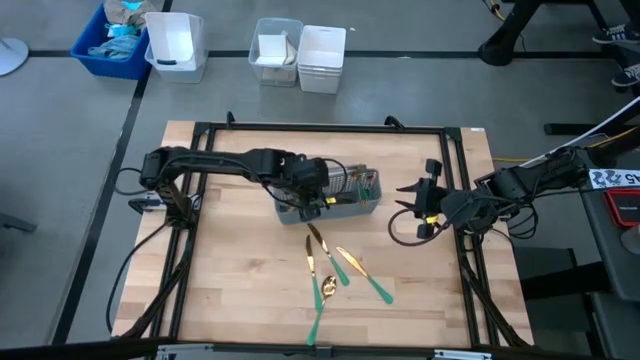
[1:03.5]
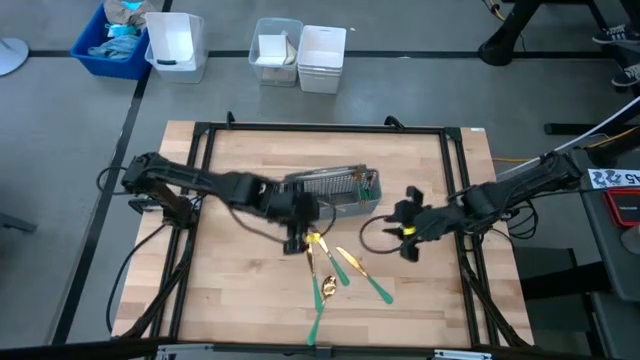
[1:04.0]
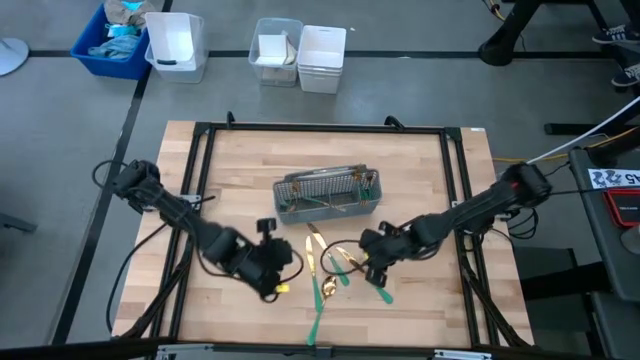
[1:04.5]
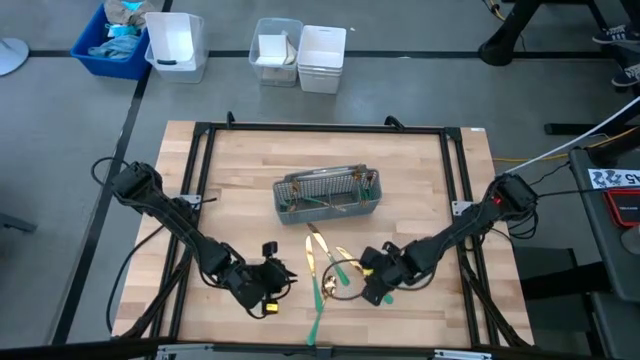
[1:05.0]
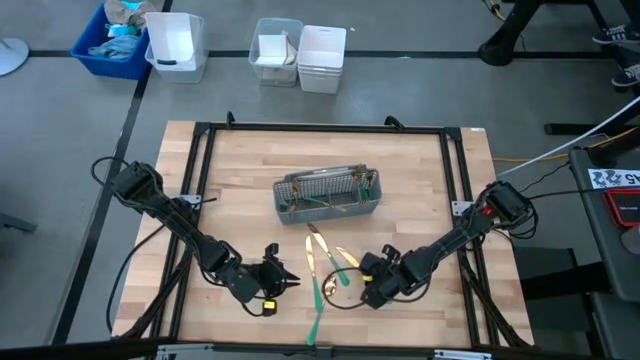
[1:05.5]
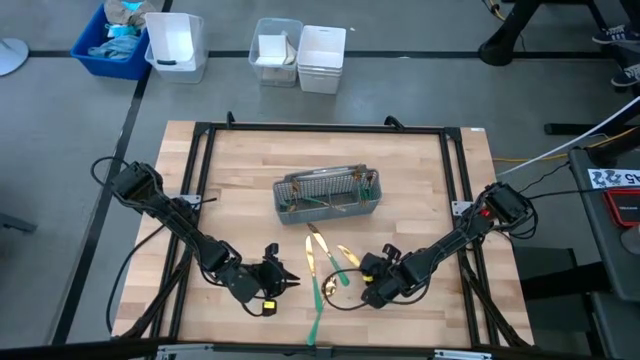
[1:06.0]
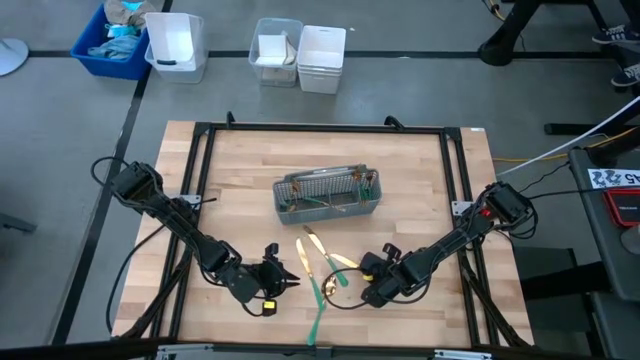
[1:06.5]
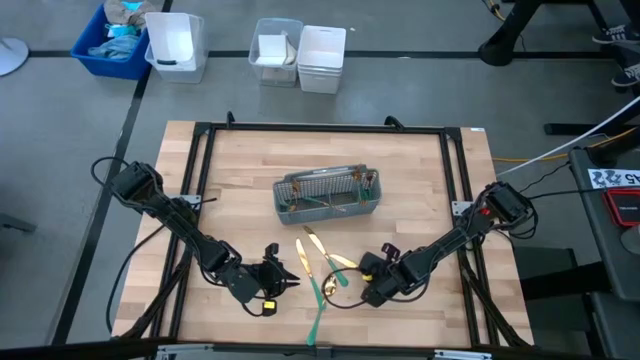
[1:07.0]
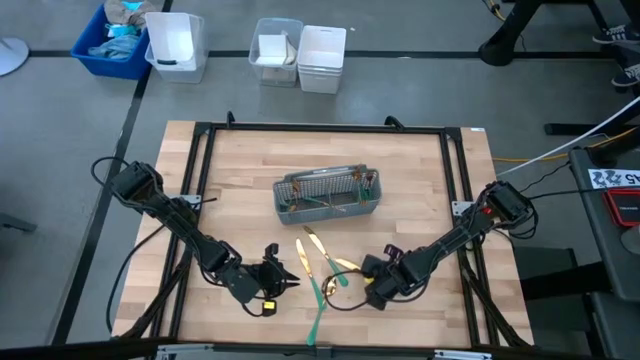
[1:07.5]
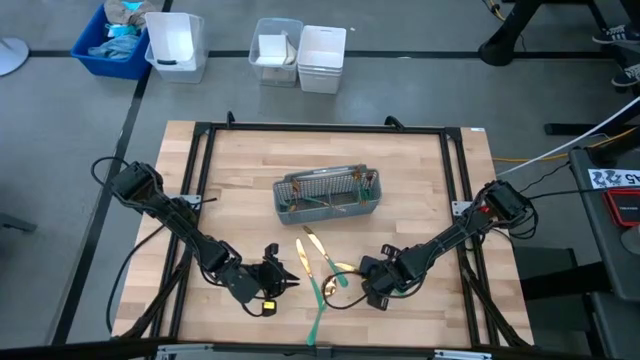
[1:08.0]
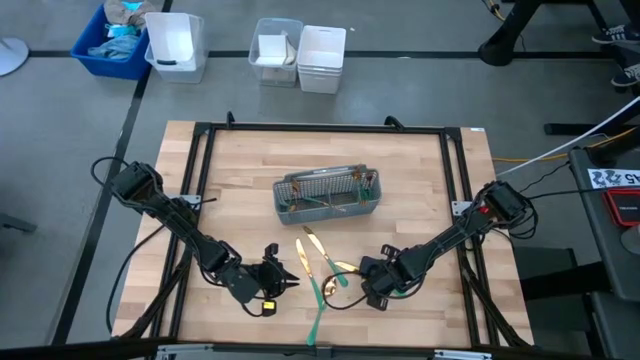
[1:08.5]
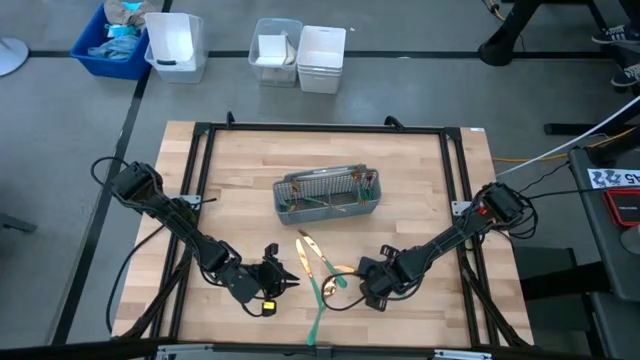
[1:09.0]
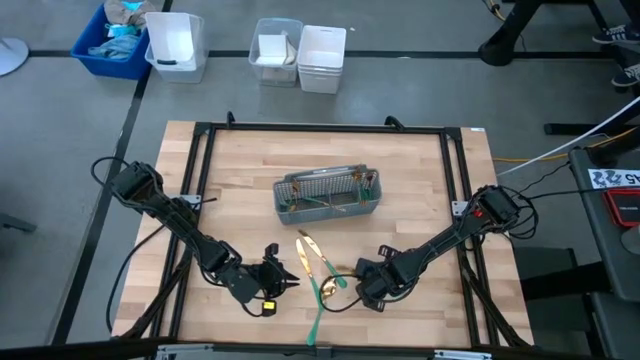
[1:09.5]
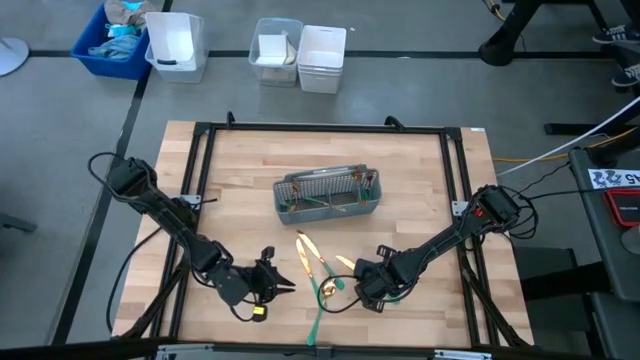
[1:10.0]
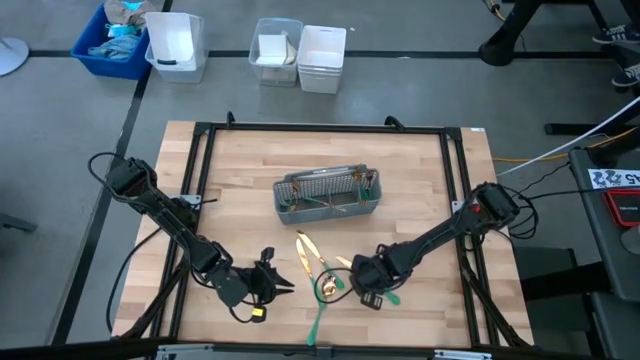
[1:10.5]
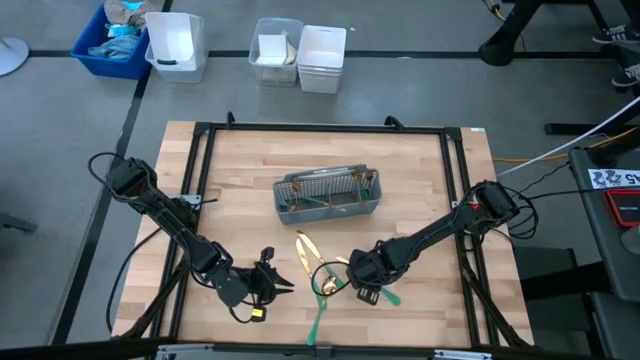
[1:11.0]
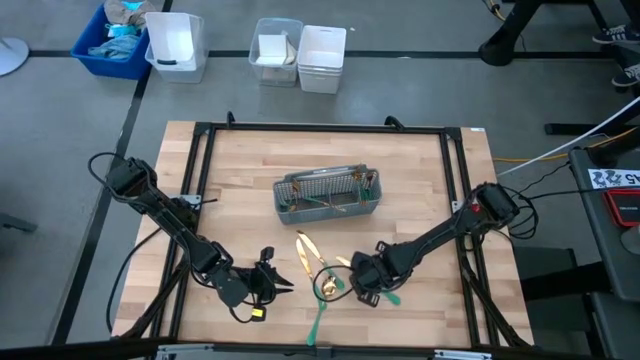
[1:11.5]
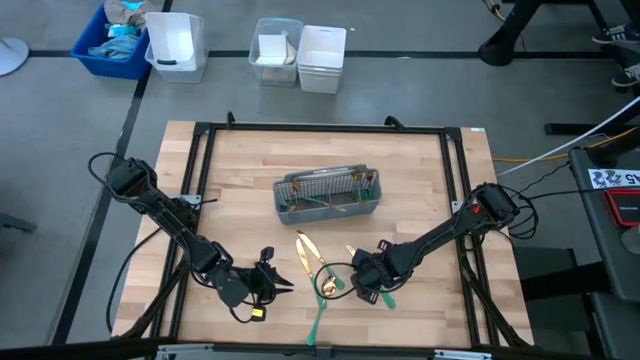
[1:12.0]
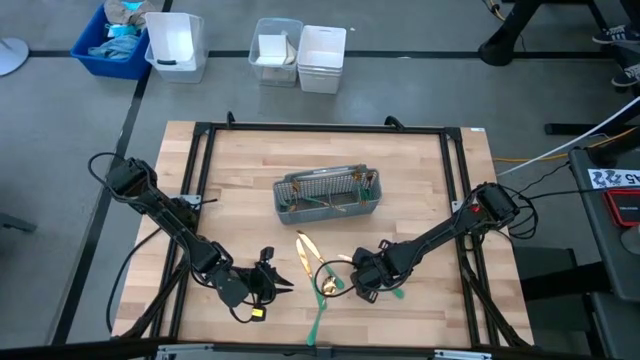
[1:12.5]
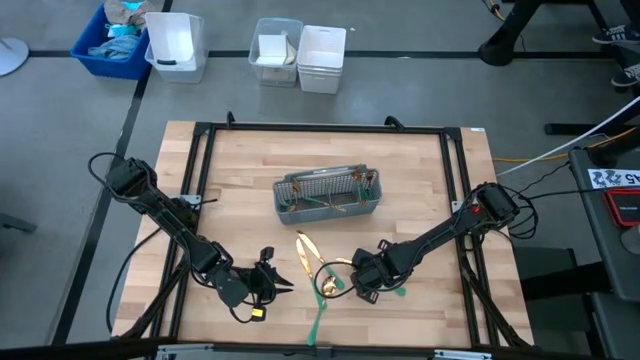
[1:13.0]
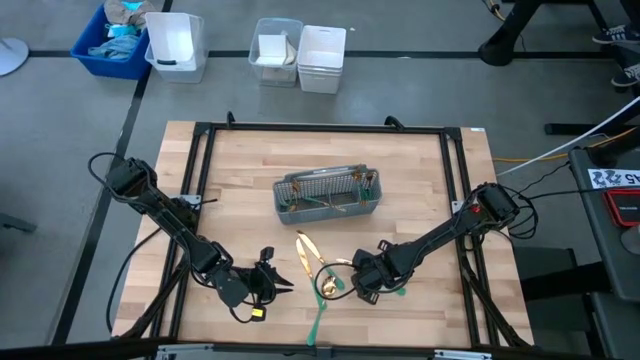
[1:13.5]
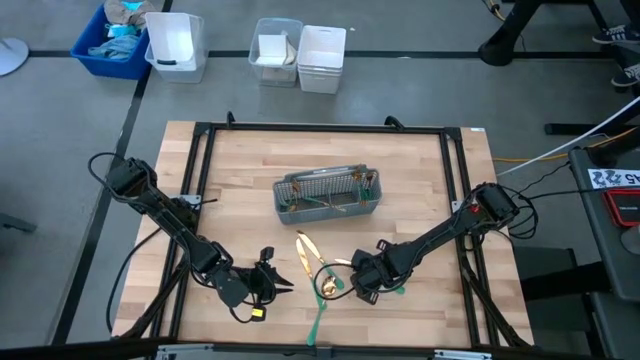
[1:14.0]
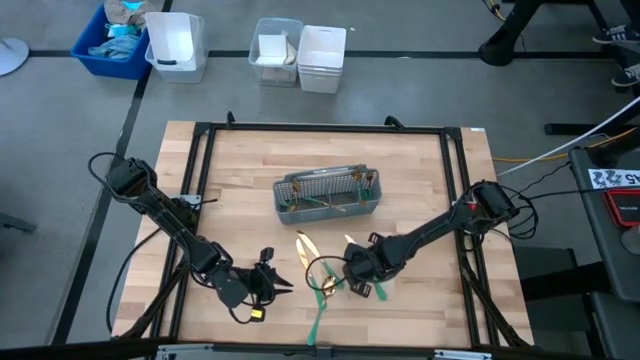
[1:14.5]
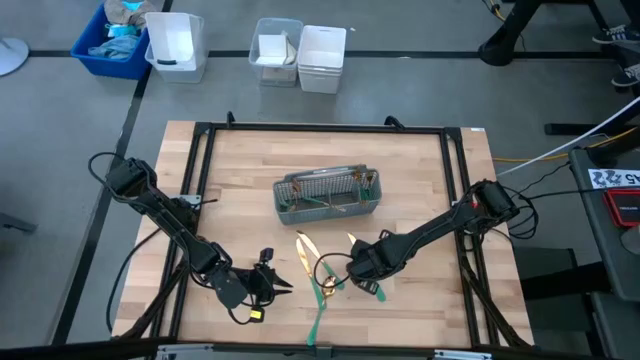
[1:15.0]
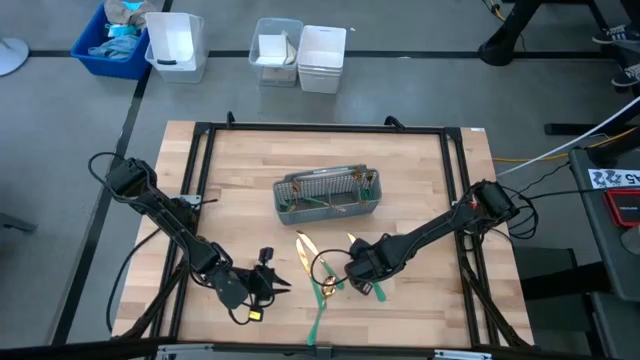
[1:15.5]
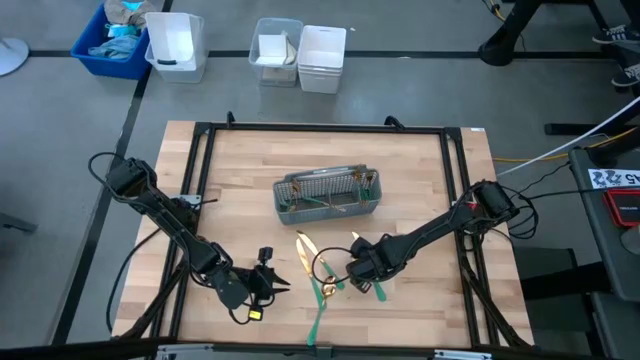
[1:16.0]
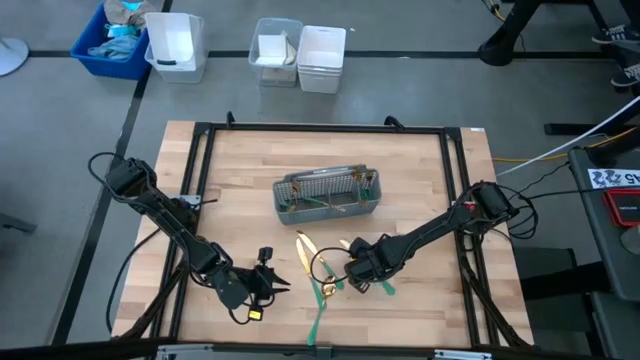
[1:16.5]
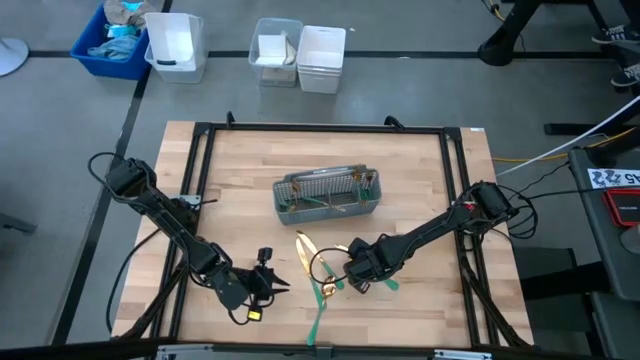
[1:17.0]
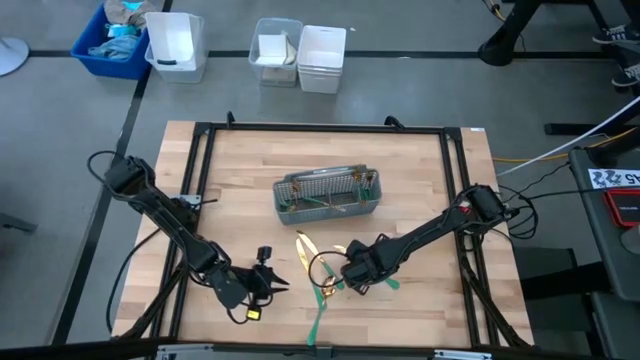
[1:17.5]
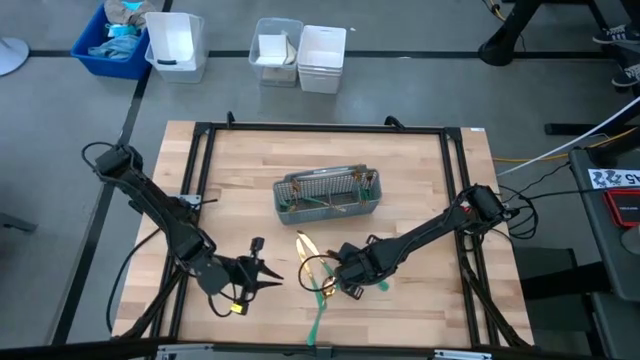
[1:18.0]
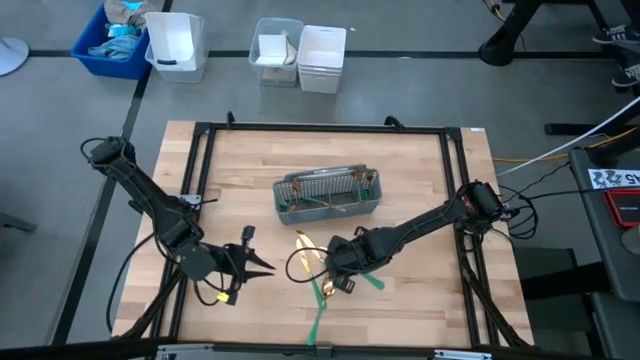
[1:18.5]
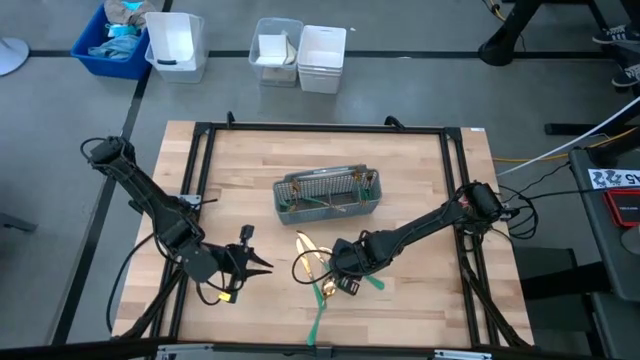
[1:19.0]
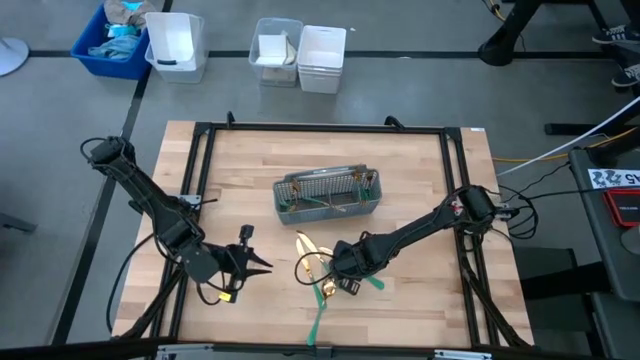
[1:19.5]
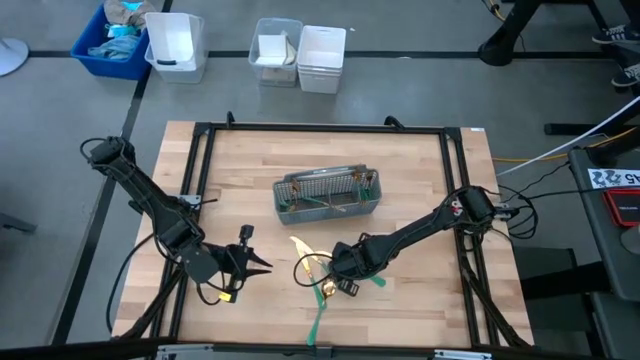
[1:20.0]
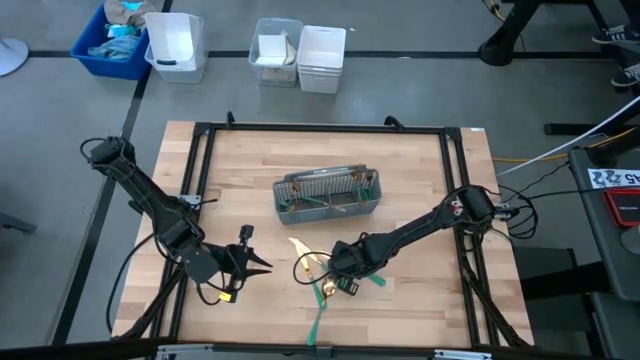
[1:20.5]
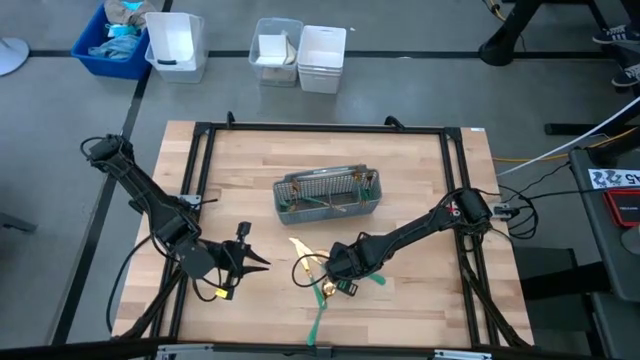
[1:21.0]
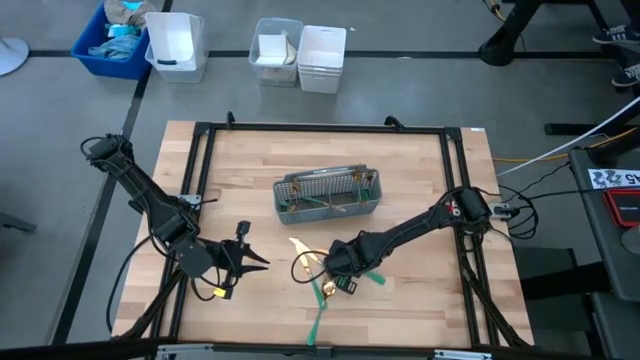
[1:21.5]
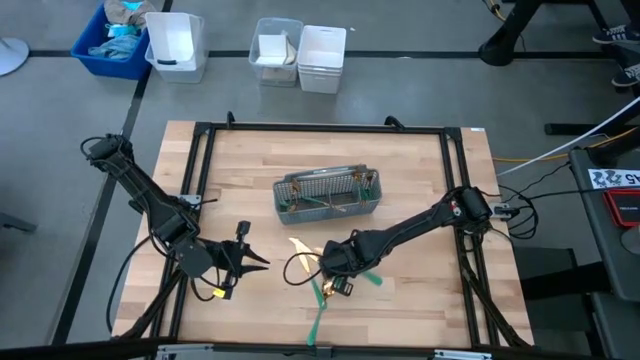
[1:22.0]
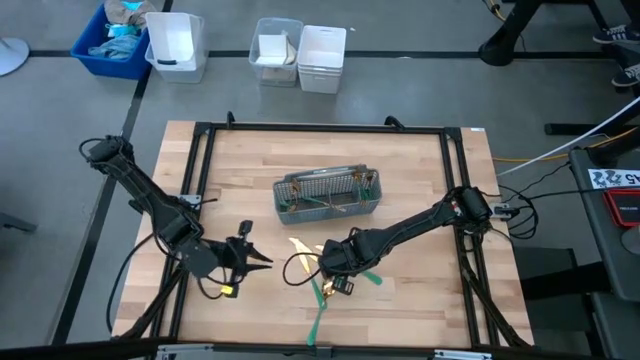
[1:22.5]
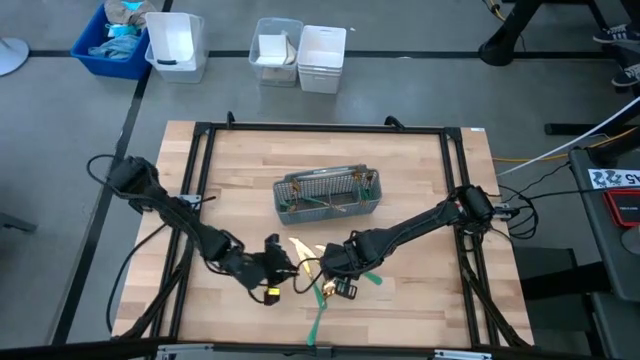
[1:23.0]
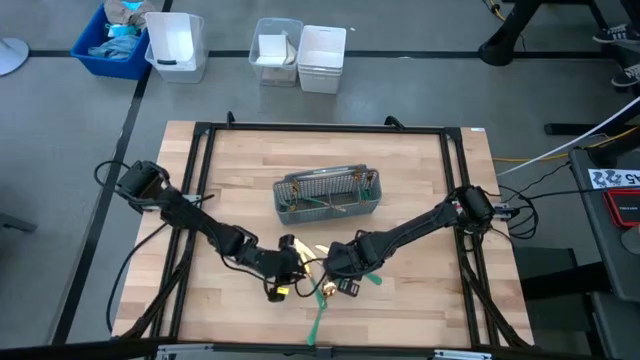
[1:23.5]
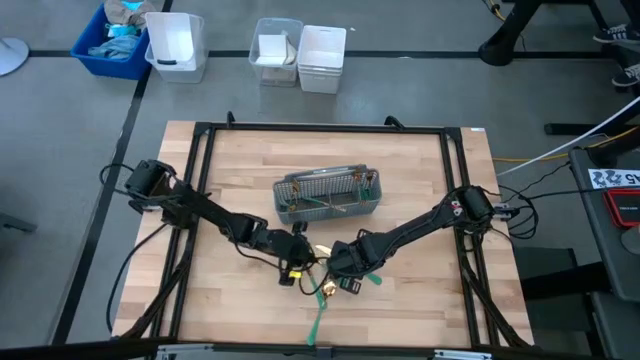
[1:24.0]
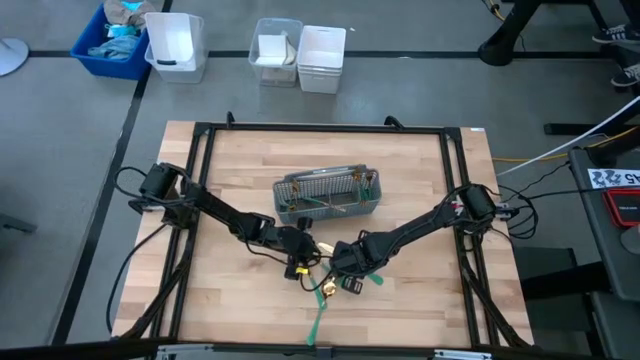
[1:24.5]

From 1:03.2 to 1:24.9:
Task: Sort silverware
Put the green knife in the gray silverware basket

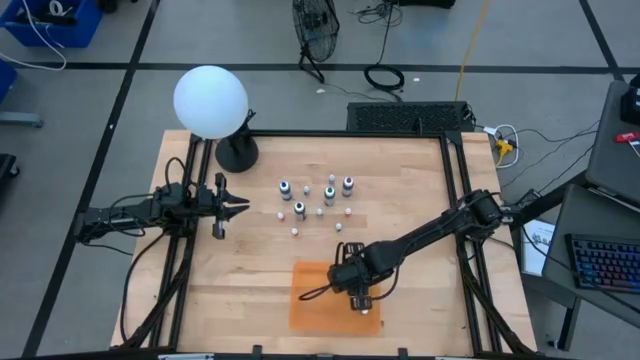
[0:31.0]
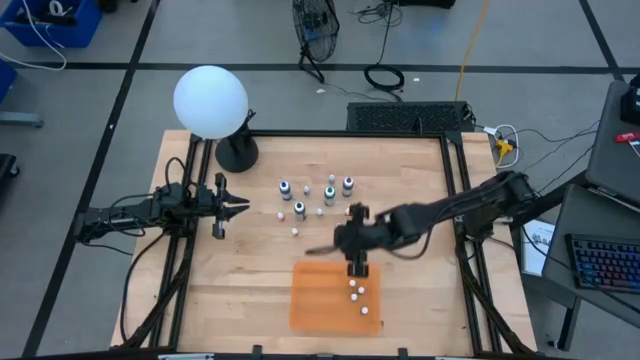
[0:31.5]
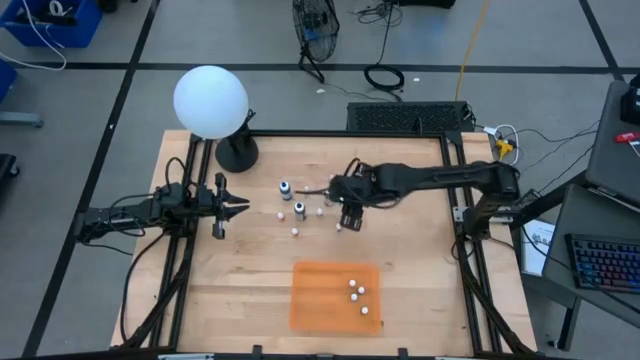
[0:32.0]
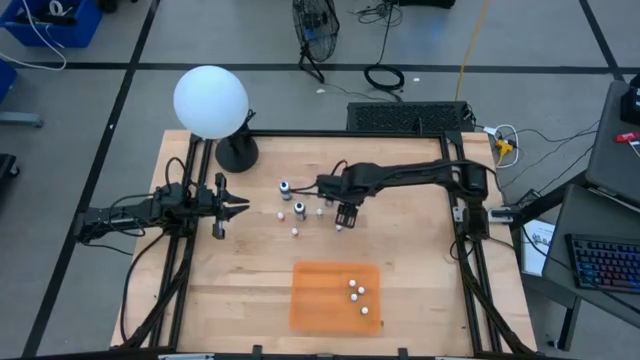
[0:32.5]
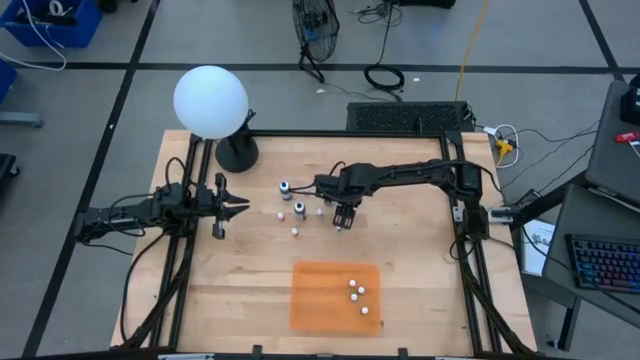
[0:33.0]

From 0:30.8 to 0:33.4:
Task: Pick & Place food coloring
Put the small orange food coloring bottle into the orange container
